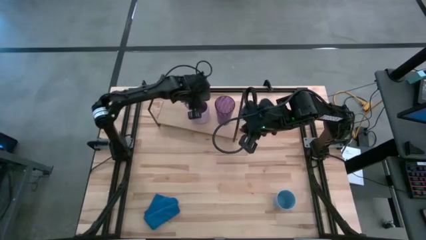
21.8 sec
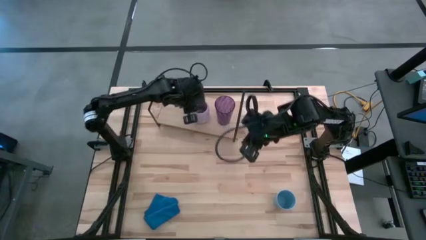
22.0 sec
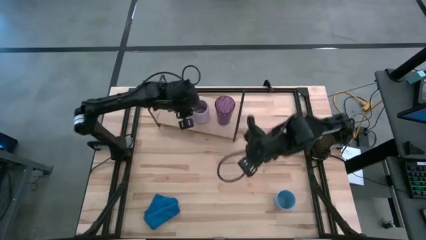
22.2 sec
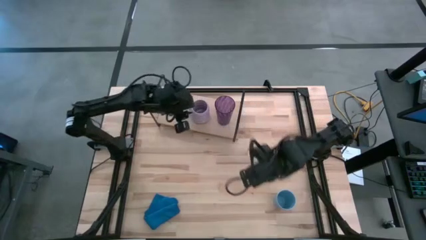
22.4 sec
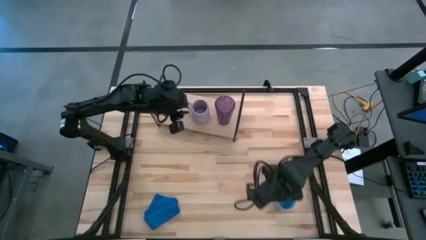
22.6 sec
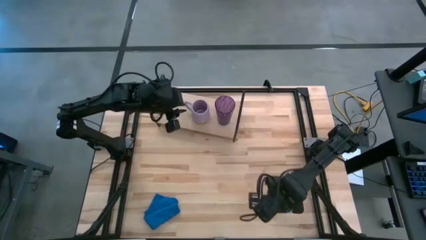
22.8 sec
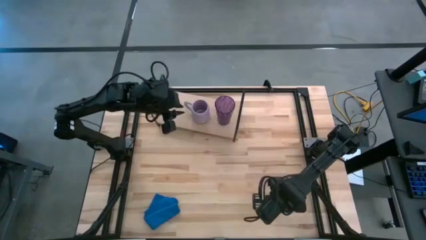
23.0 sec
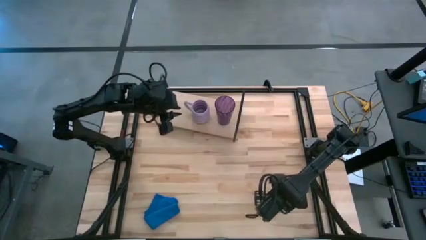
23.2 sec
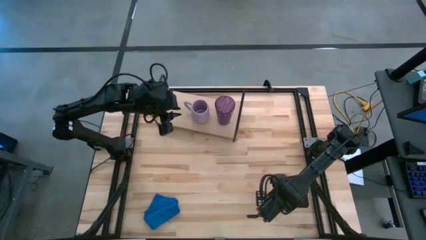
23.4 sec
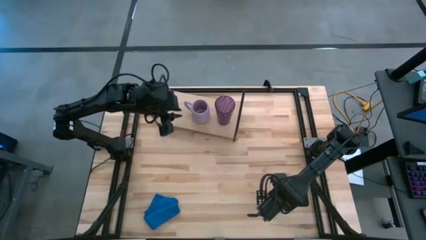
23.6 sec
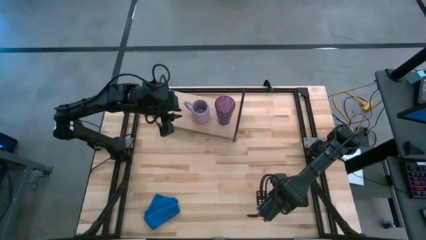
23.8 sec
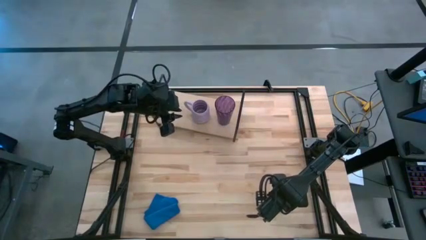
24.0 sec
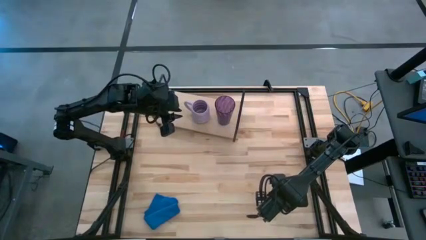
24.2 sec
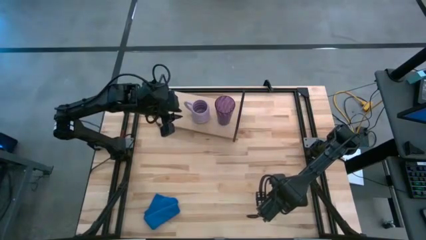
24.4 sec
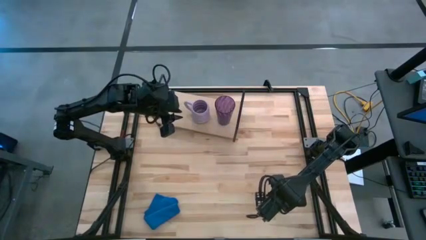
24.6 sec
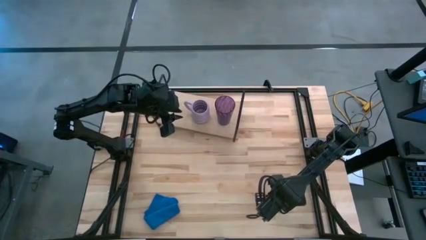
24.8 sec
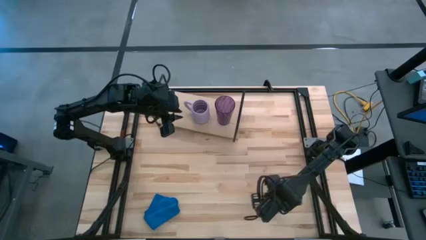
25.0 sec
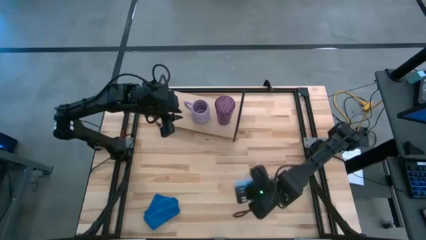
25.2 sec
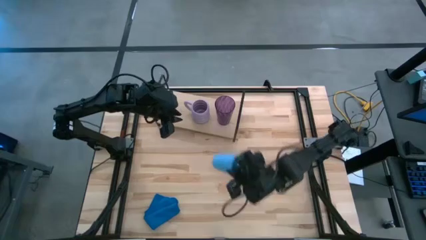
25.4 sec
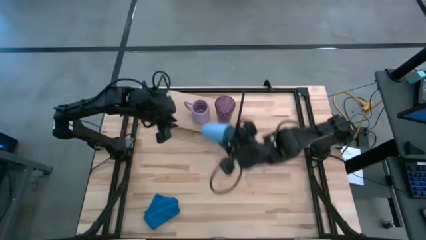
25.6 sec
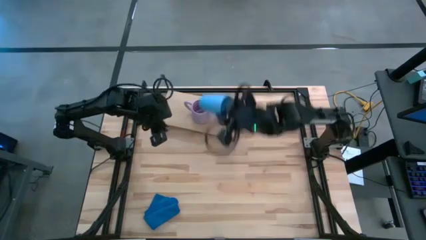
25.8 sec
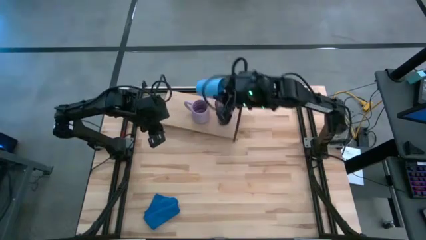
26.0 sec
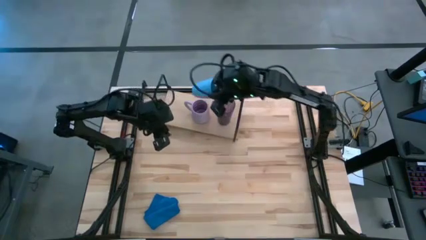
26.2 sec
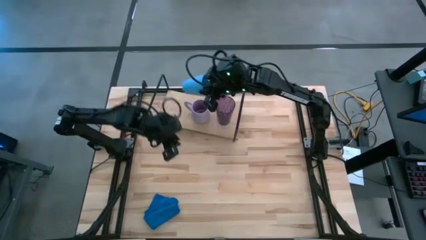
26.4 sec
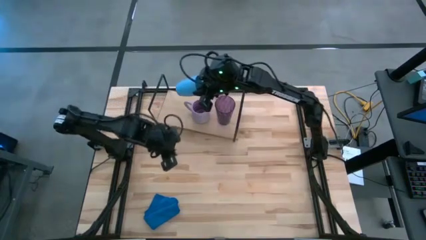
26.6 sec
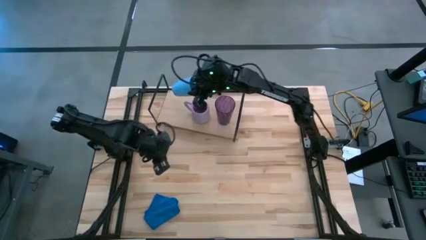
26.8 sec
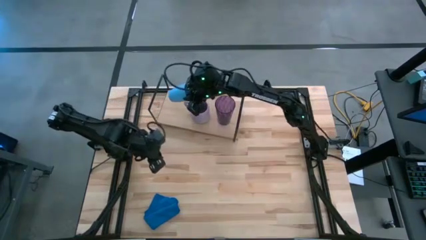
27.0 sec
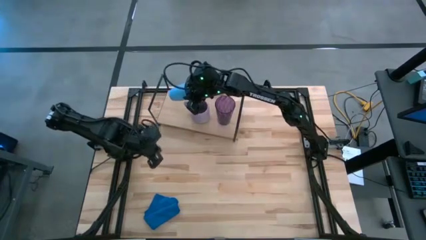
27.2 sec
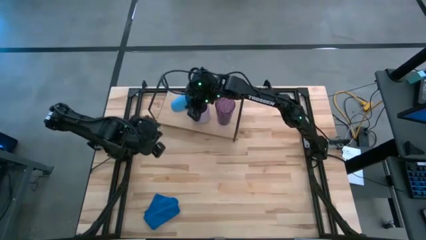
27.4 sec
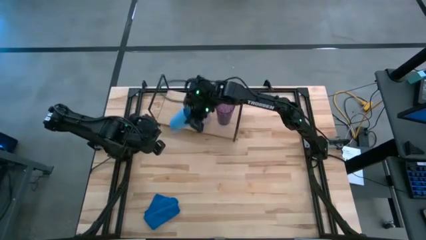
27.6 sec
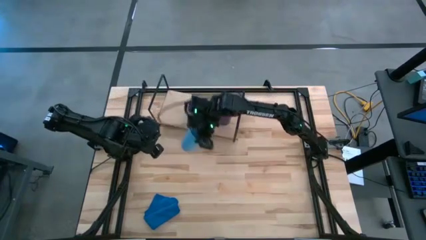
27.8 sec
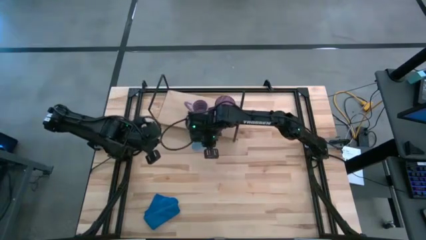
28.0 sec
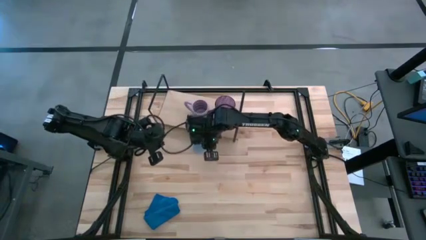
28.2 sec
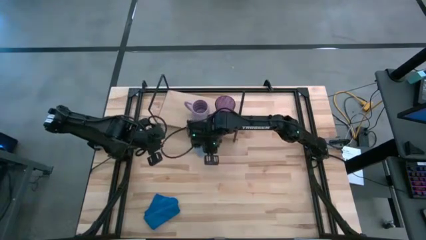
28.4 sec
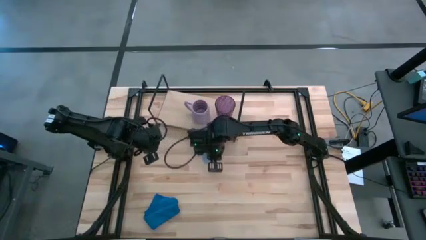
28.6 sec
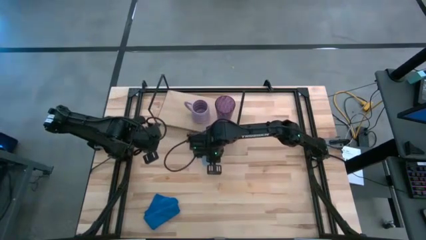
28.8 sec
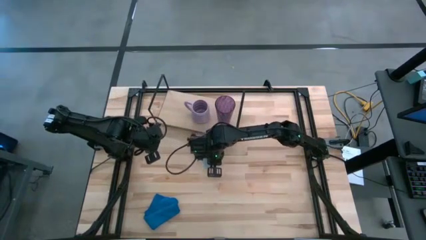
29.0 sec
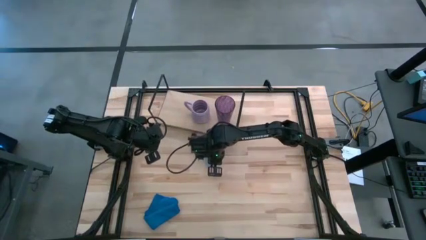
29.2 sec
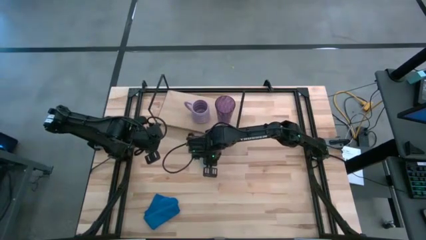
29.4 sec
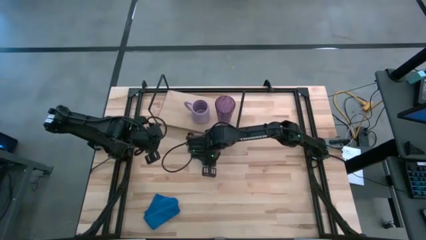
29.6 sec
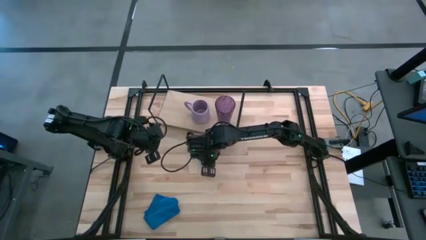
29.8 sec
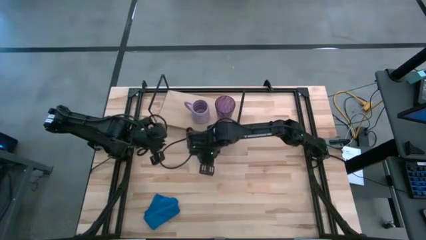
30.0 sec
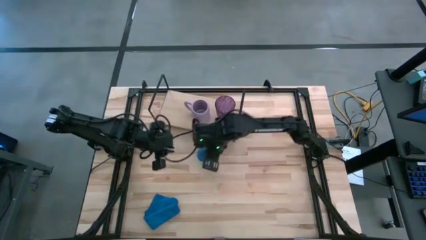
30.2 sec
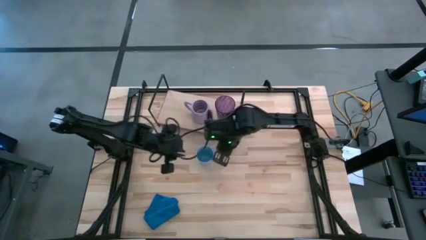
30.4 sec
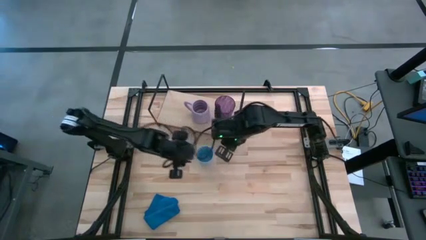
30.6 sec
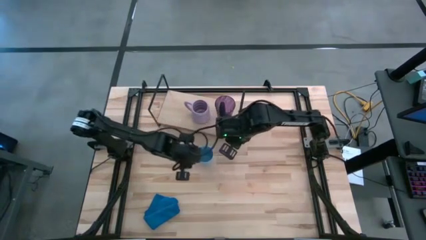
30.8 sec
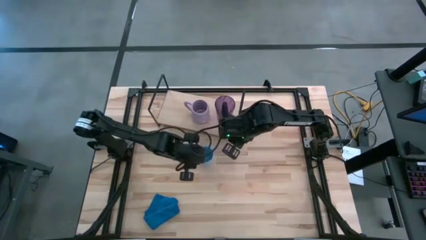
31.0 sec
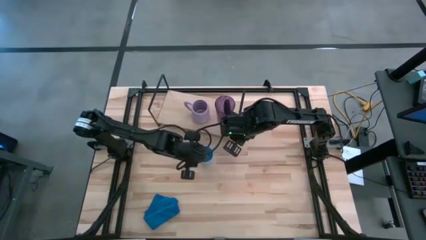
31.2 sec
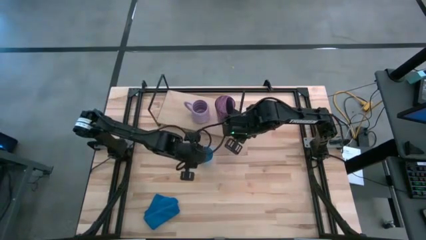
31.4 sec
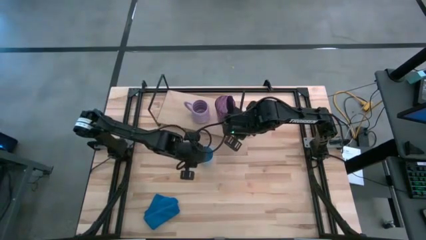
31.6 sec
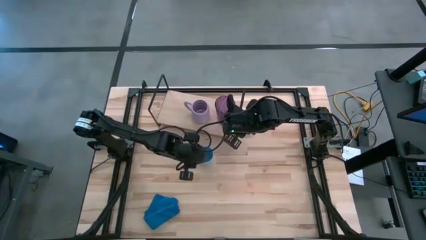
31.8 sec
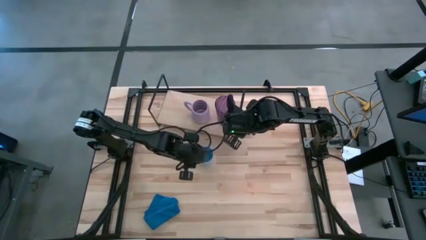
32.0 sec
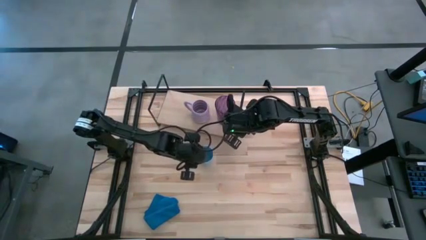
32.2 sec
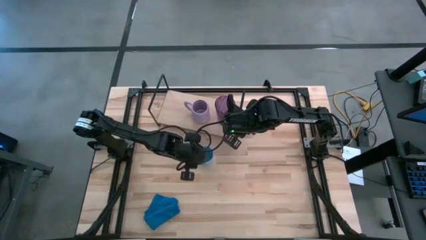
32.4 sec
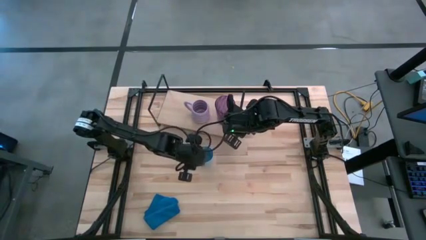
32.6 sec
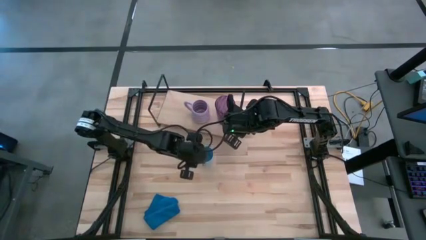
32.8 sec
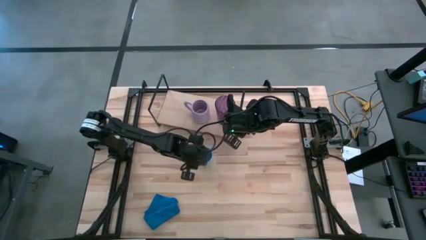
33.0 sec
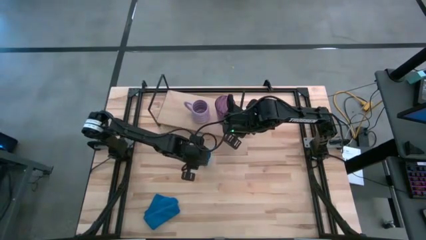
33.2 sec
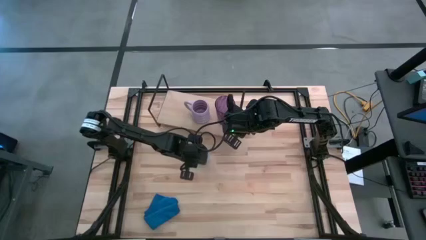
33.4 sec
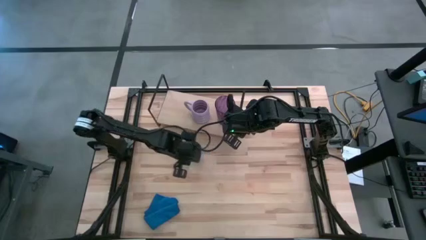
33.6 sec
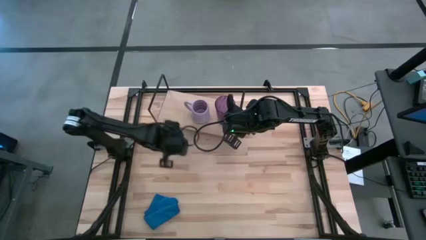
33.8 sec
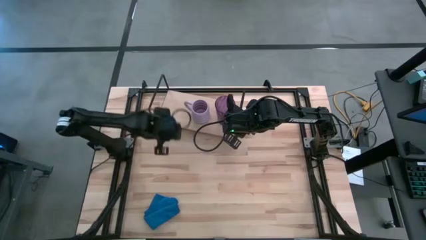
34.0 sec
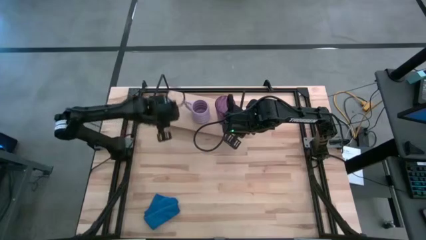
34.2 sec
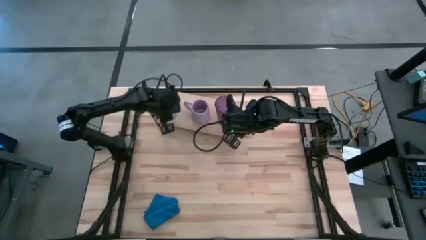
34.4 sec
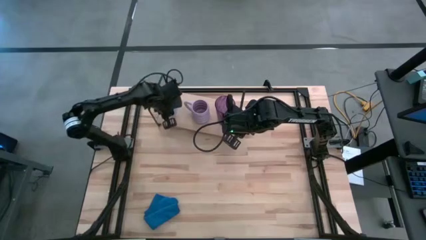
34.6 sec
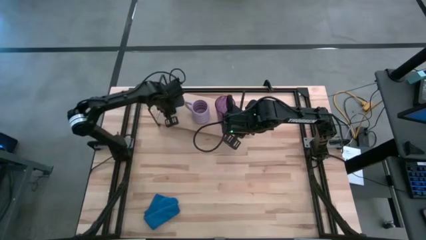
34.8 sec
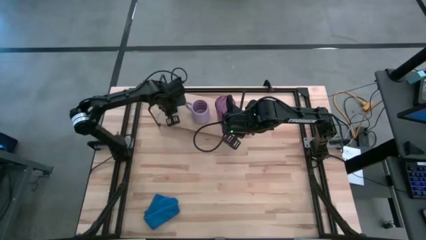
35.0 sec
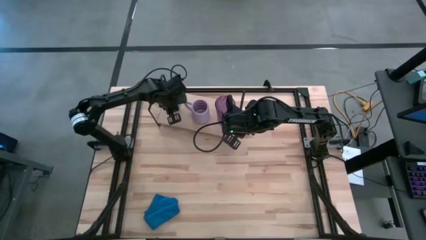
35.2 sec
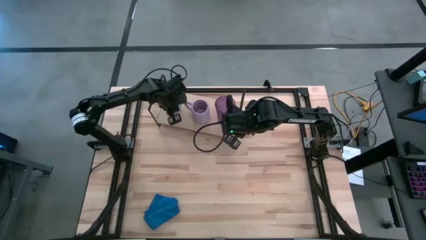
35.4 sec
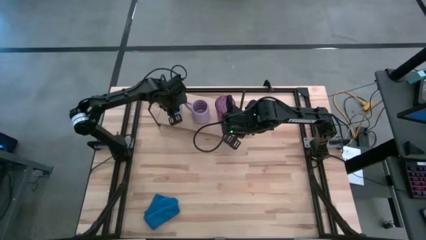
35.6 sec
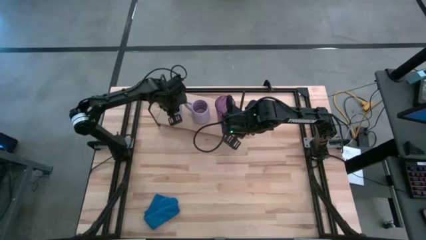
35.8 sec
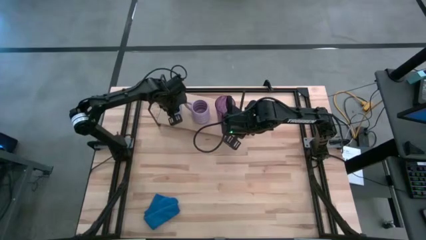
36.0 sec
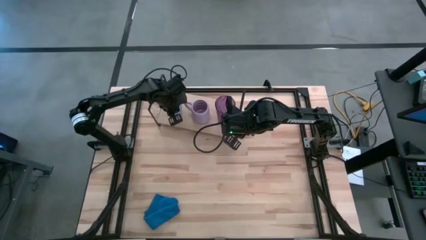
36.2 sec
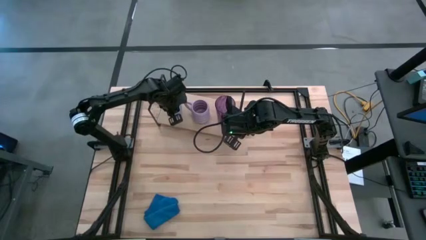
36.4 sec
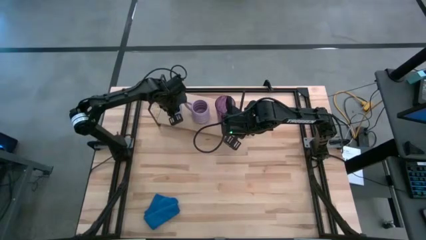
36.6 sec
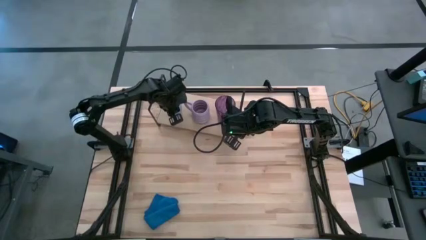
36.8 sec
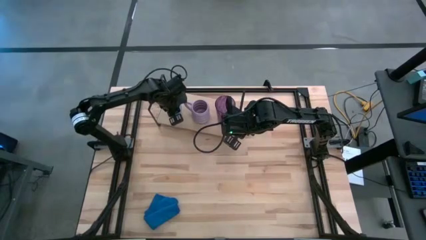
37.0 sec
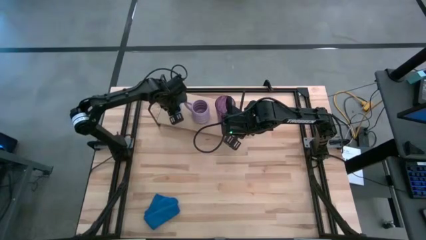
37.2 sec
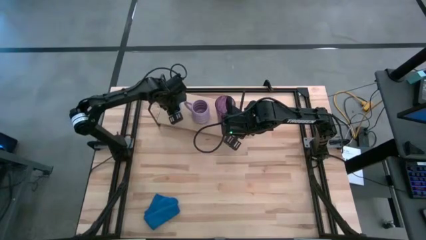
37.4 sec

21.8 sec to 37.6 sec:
Task: Stack small to large cups/mugs on shelf
Put the blue cup on the shelf
